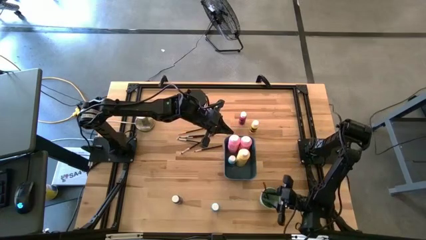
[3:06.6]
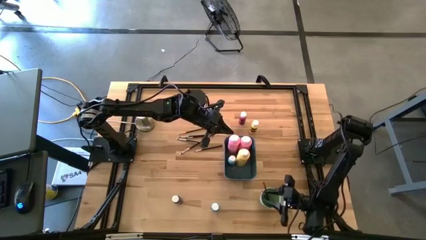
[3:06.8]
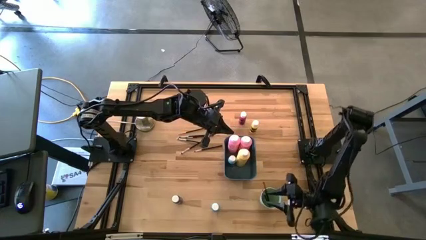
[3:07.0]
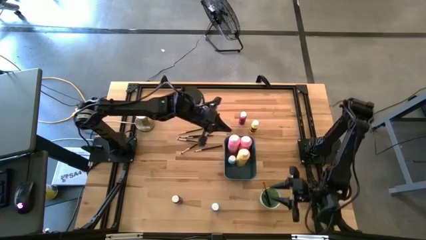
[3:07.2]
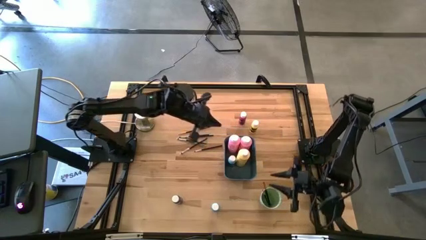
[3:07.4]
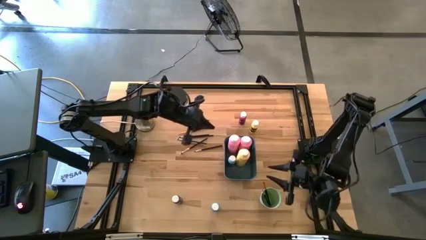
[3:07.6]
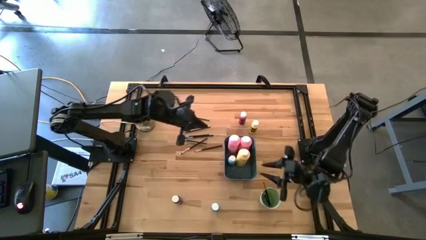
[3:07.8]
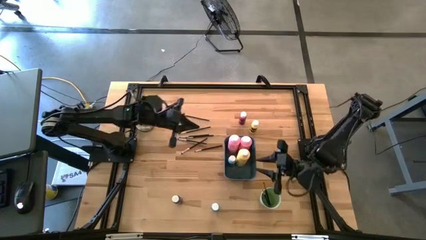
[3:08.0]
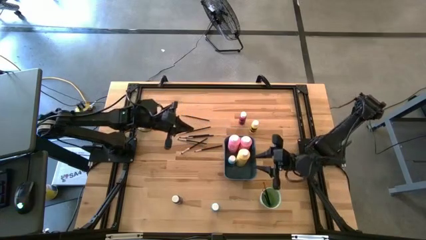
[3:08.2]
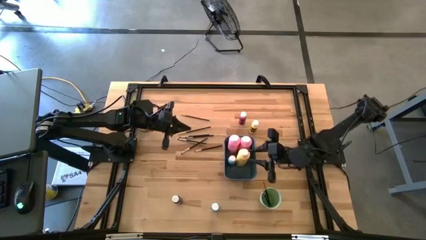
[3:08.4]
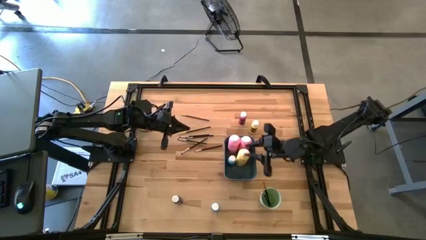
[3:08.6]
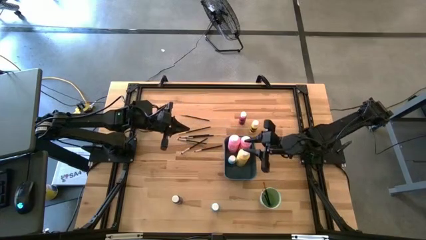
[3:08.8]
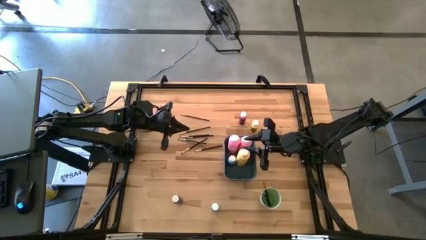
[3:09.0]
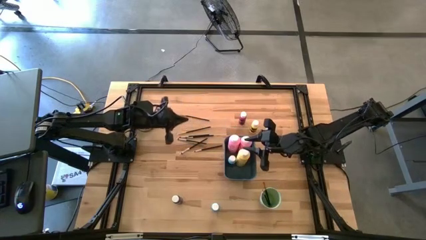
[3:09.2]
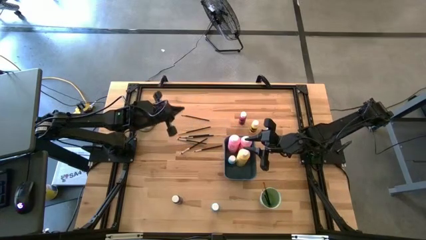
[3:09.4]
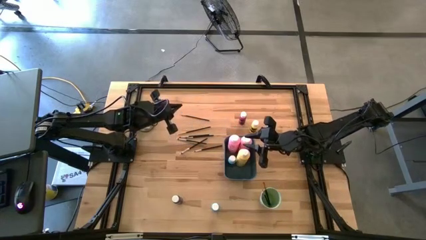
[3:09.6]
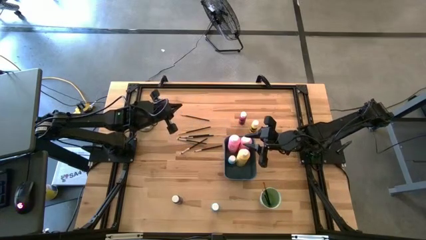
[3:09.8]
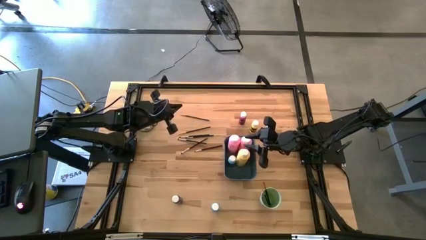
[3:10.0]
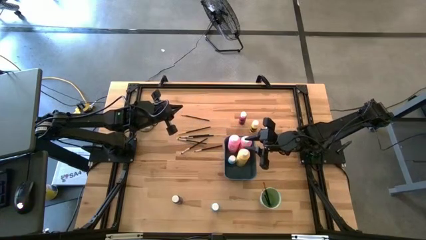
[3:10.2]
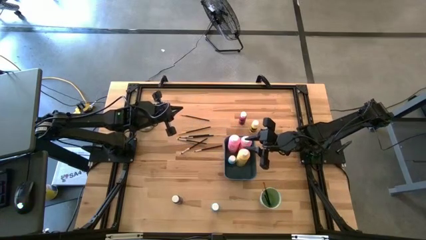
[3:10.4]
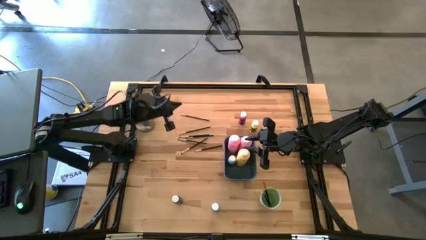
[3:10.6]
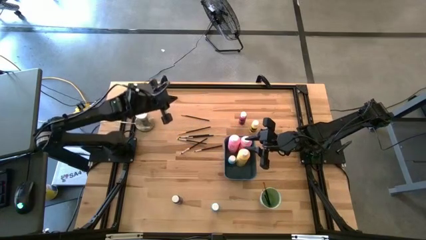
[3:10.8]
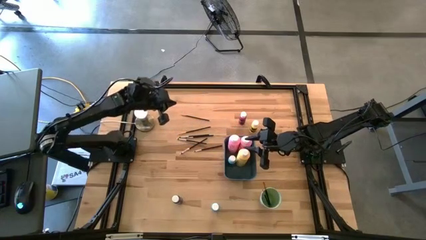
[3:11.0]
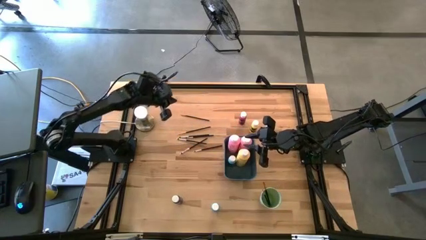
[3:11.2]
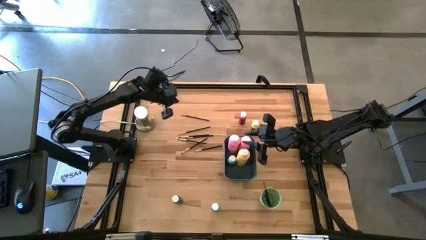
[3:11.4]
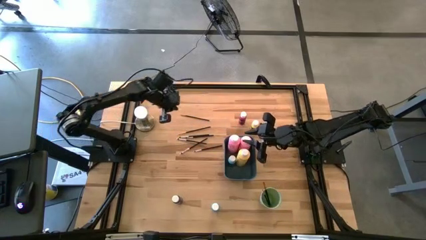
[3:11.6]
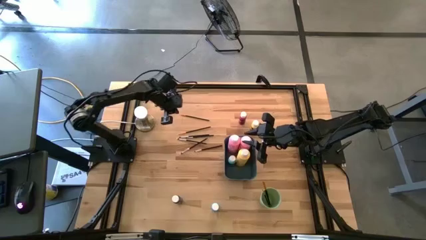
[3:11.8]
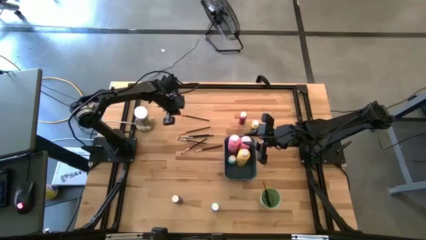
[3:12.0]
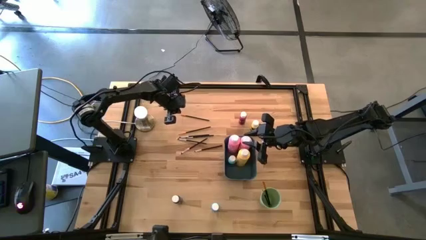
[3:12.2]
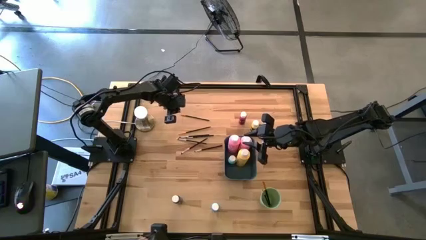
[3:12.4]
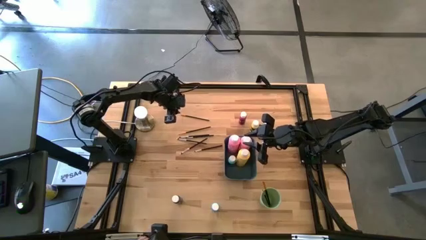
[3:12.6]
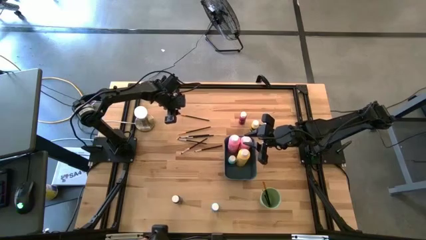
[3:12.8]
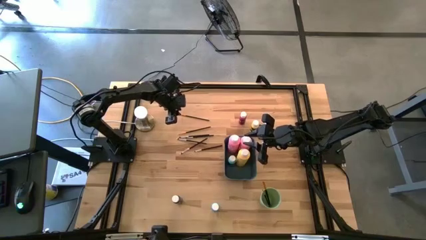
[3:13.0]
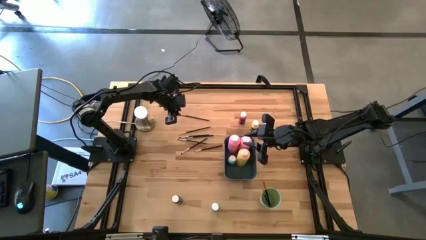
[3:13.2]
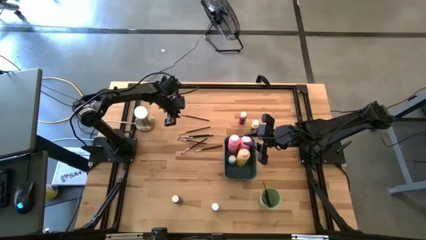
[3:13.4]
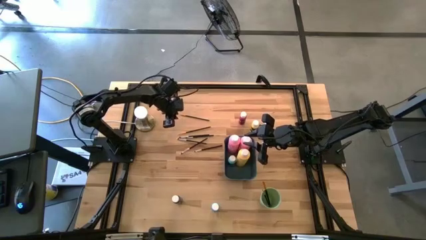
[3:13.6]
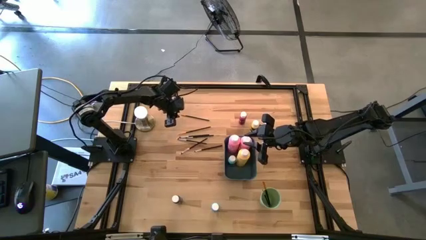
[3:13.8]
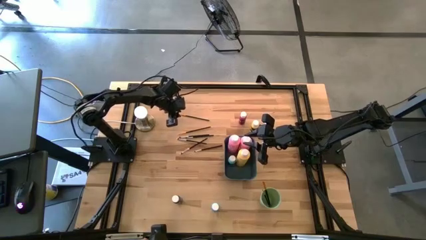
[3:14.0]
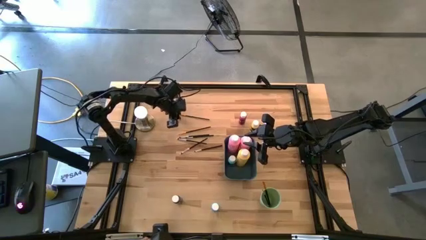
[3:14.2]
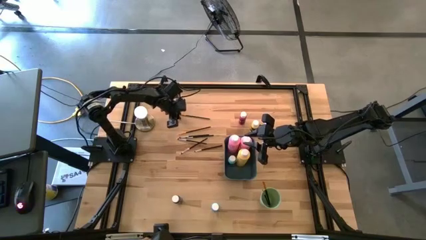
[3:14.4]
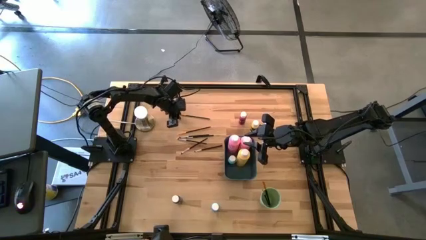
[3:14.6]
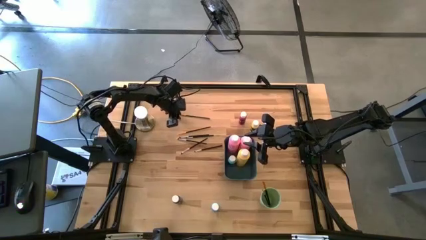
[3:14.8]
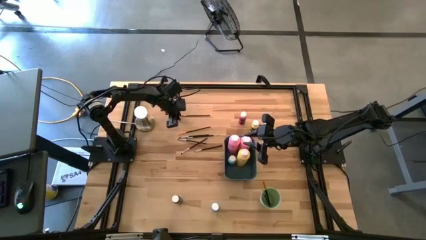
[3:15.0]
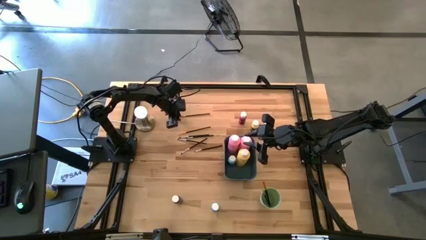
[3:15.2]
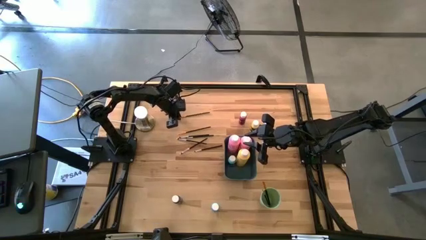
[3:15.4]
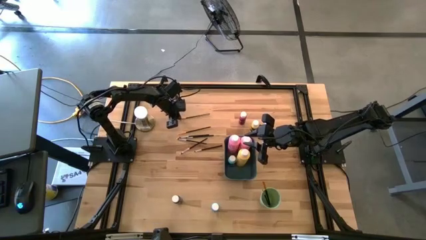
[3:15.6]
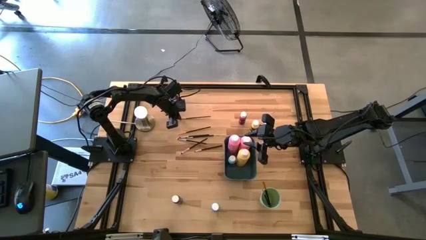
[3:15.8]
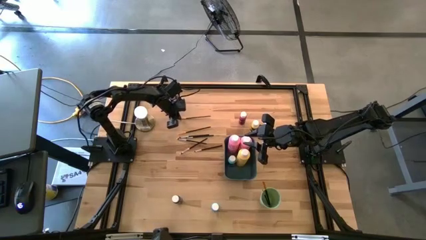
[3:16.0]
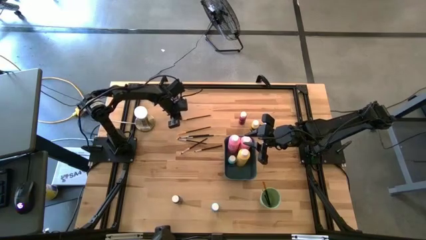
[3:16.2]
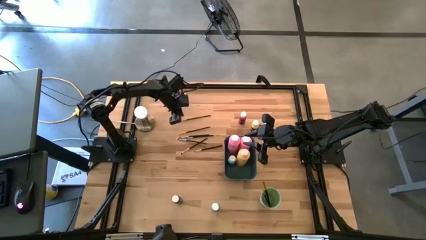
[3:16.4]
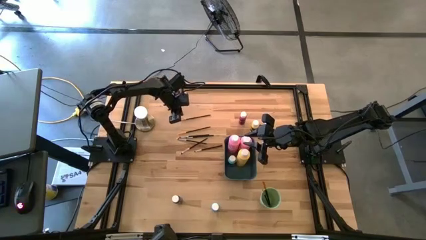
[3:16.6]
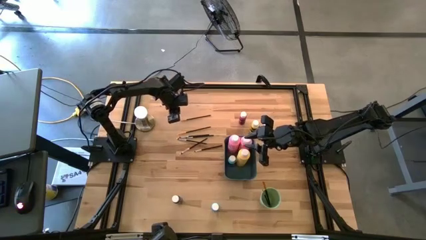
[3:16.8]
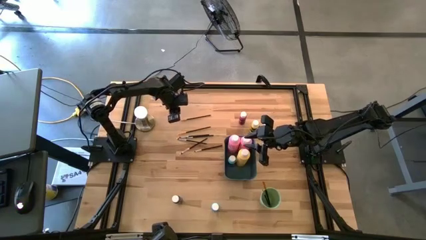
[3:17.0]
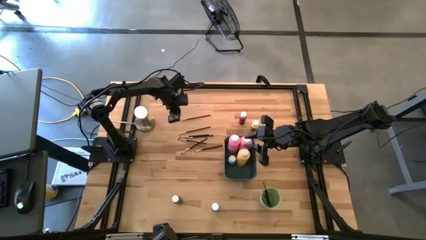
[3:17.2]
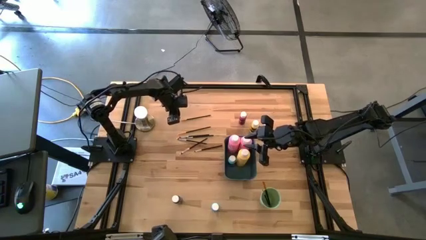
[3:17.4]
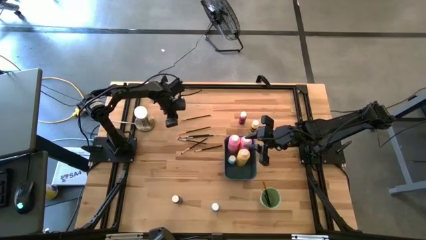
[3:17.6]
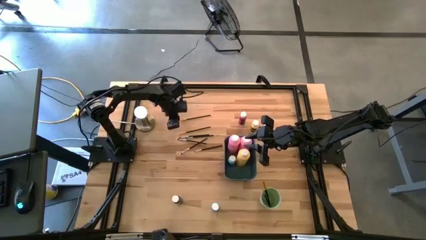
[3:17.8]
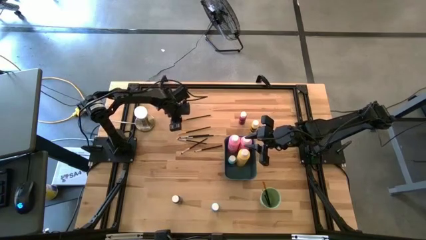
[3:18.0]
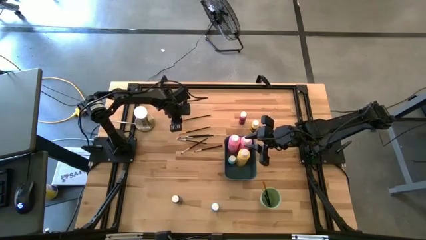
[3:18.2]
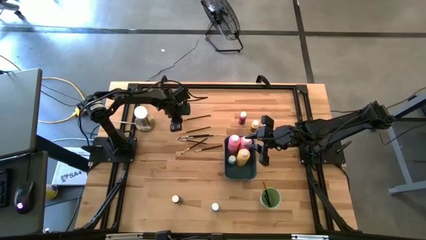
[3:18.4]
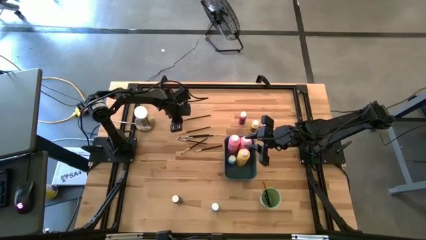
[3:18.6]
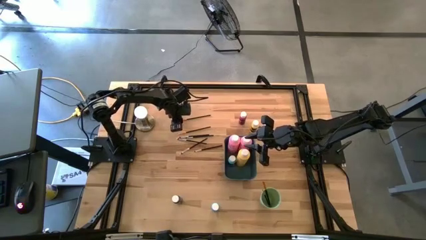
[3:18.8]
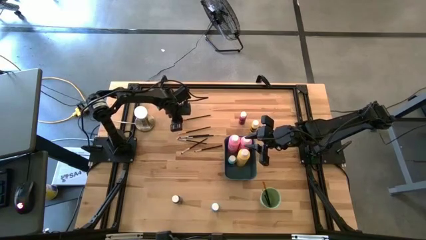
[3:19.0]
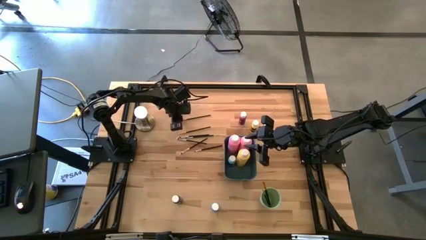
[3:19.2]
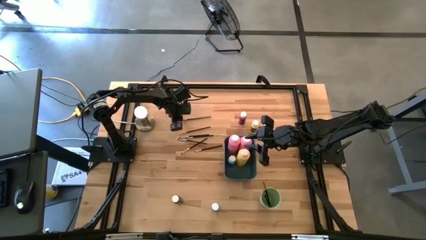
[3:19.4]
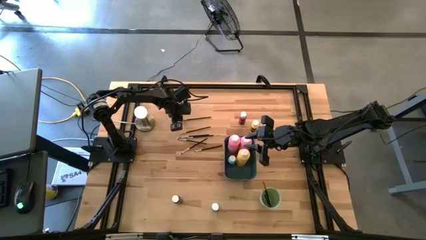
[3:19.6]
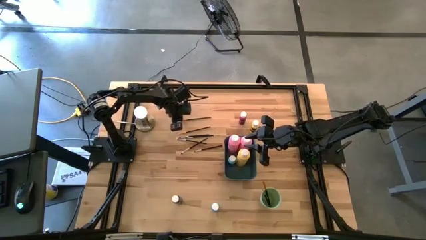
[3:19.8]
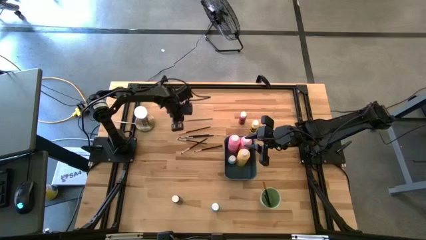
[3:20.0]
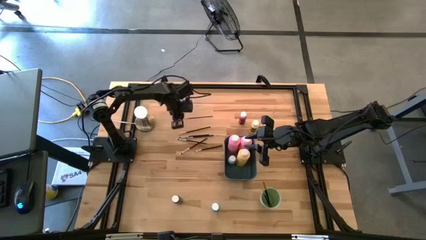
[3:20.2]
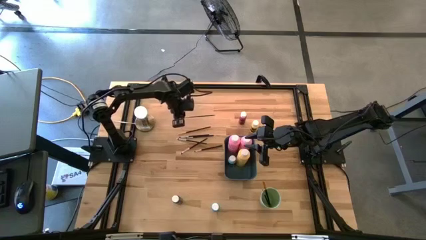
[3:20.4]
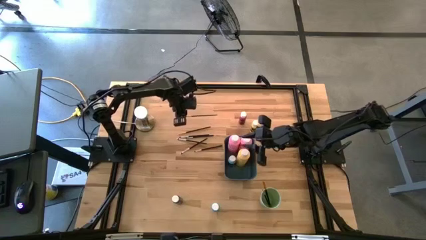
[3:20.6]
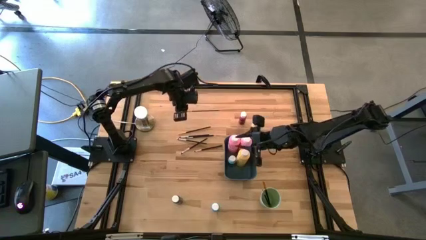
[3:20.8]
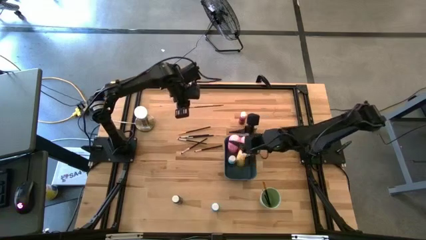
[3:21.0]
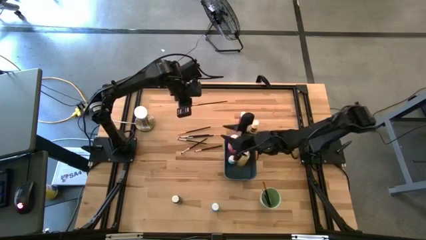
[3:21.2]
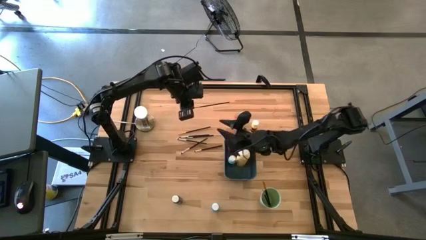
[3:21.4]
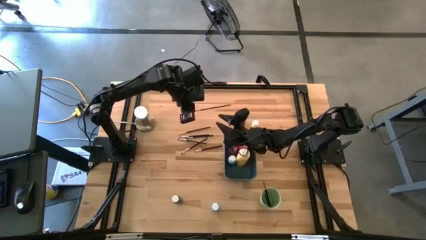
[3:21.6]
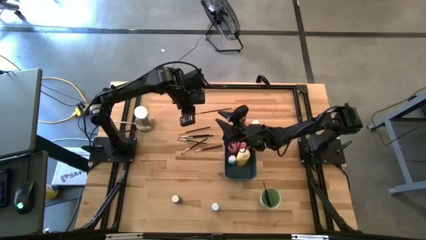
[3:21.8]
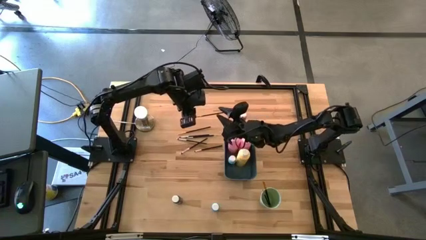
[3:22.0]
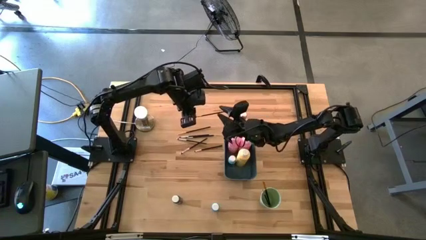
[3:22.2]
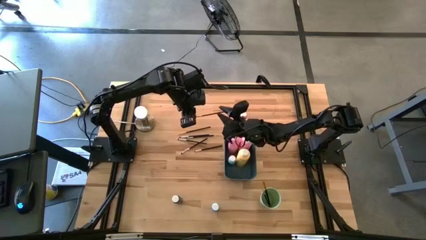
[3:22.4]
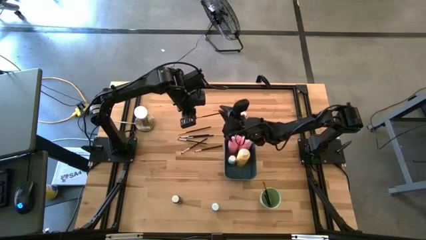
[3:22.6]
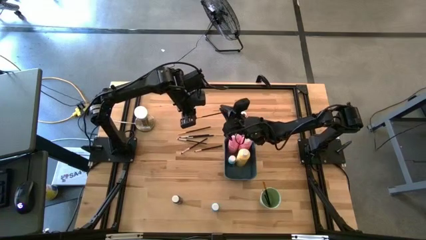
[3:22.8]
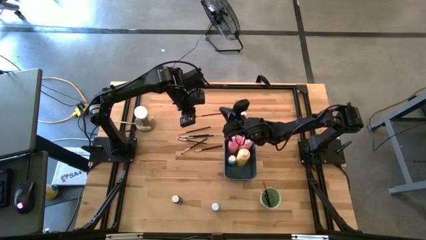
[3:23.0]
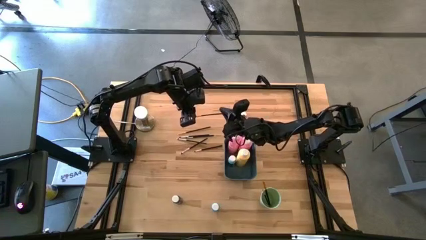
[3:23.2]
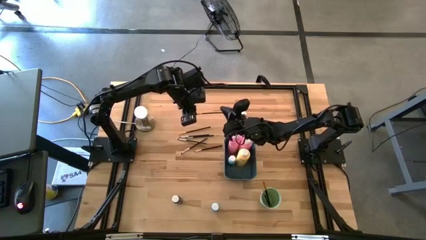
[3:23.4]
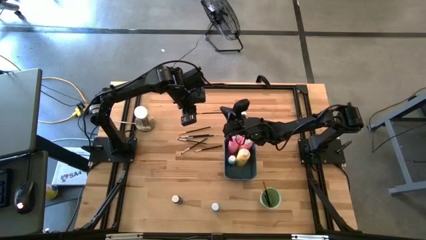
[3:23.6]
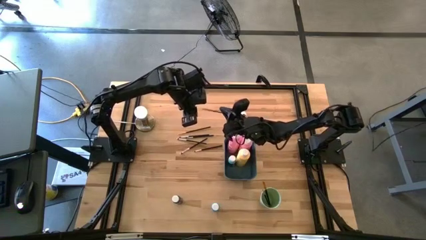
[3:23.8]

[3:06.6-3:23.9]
Task: Pick & Place Paint Supplies
Put the black and gold paint brush into the green cup
